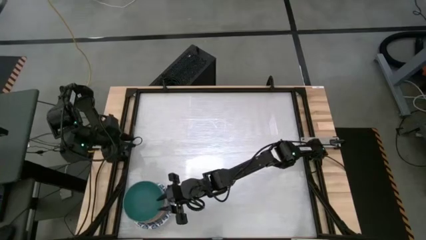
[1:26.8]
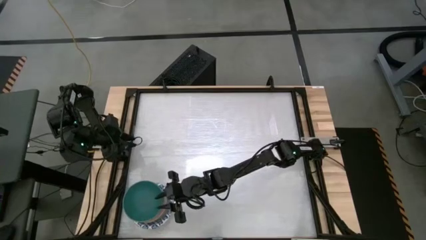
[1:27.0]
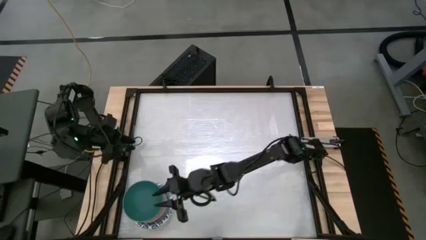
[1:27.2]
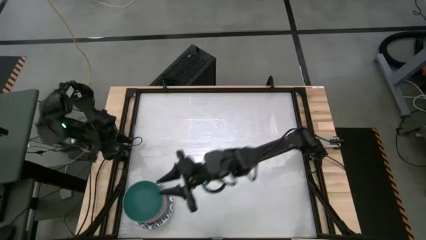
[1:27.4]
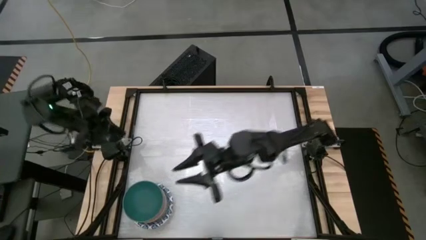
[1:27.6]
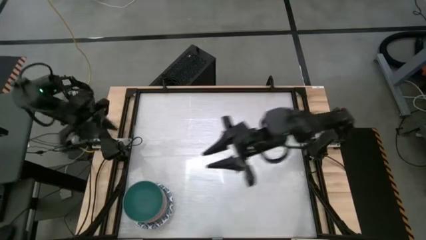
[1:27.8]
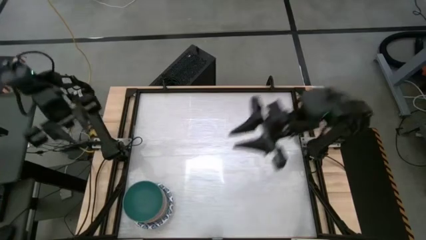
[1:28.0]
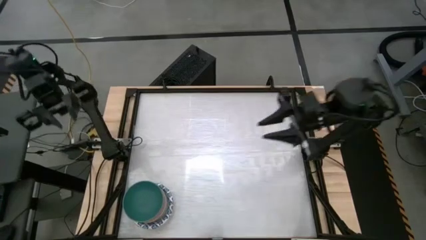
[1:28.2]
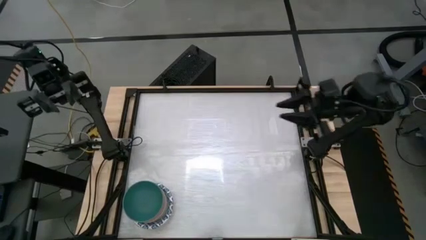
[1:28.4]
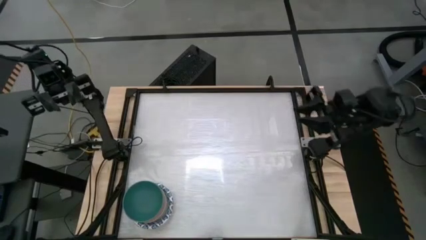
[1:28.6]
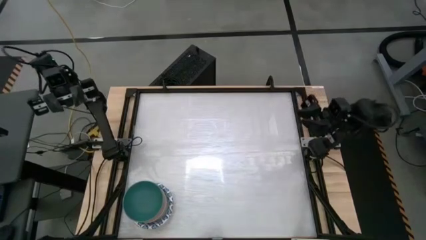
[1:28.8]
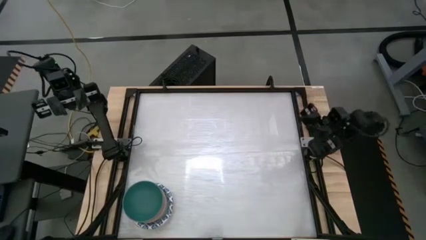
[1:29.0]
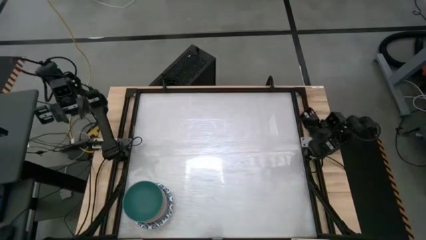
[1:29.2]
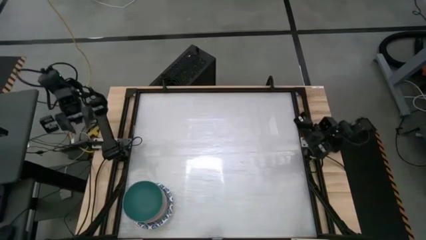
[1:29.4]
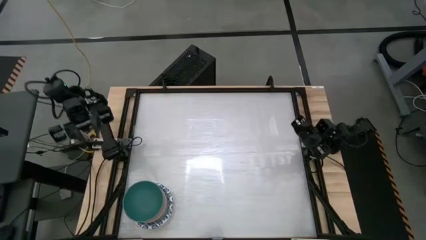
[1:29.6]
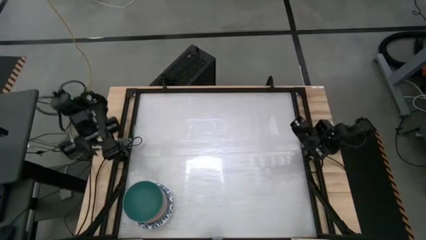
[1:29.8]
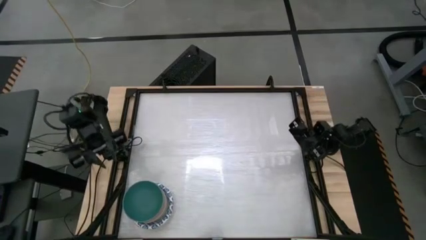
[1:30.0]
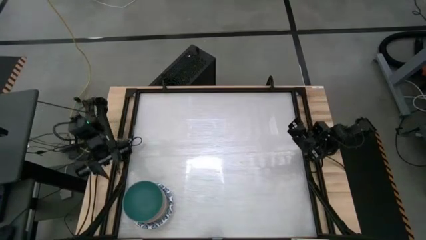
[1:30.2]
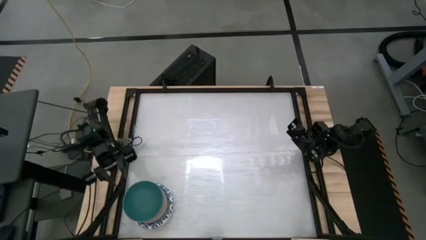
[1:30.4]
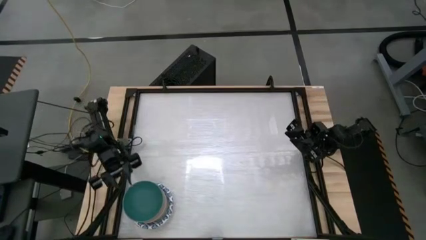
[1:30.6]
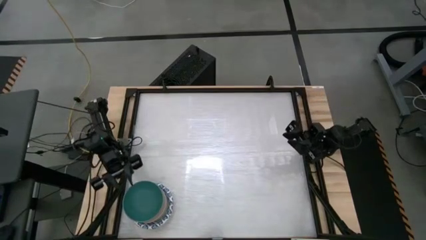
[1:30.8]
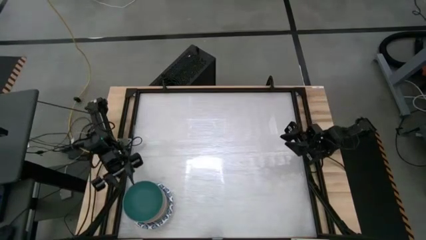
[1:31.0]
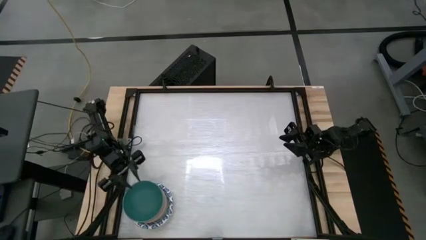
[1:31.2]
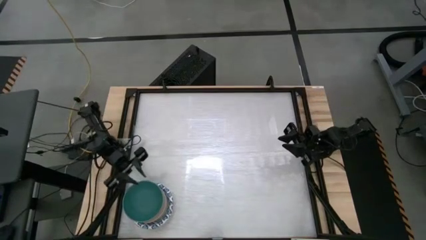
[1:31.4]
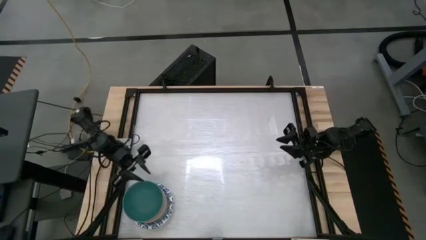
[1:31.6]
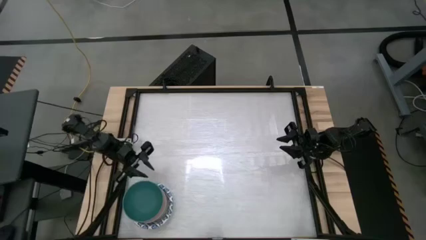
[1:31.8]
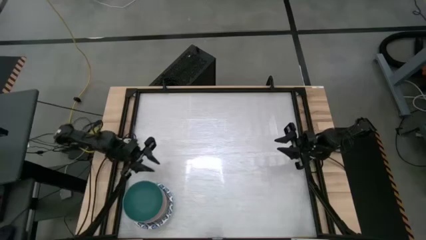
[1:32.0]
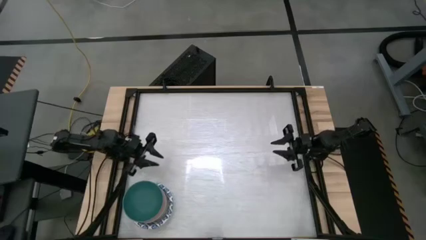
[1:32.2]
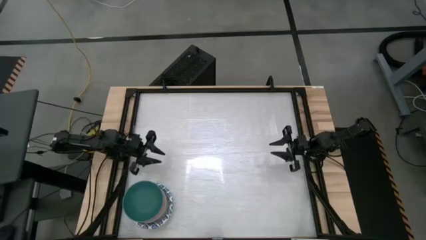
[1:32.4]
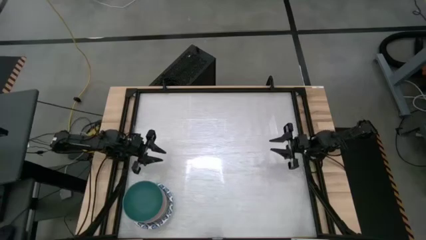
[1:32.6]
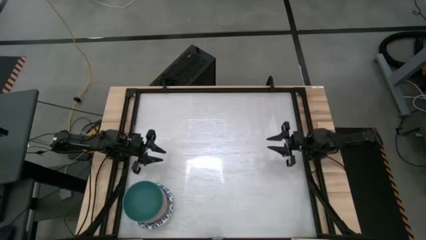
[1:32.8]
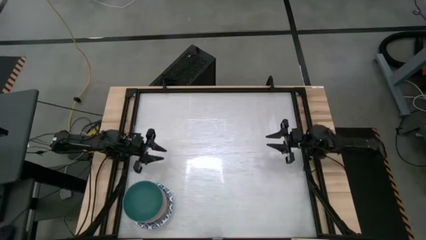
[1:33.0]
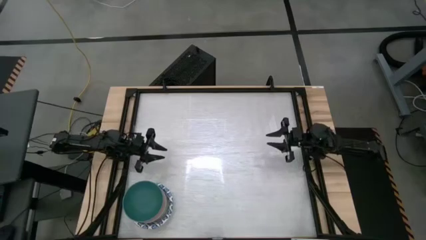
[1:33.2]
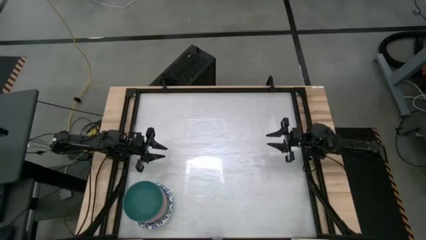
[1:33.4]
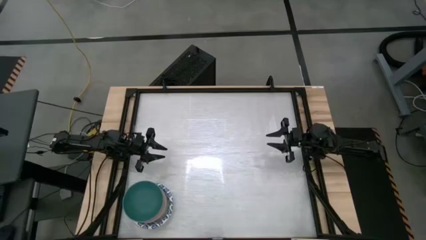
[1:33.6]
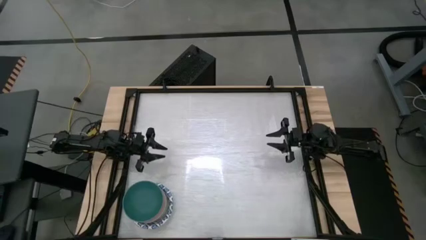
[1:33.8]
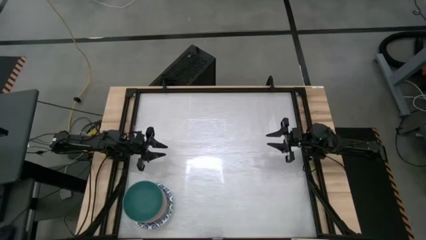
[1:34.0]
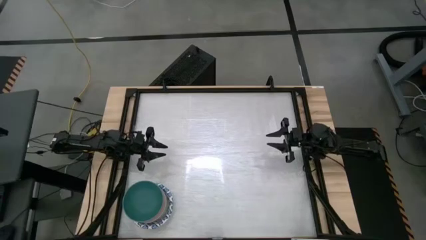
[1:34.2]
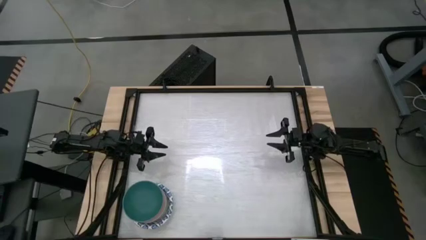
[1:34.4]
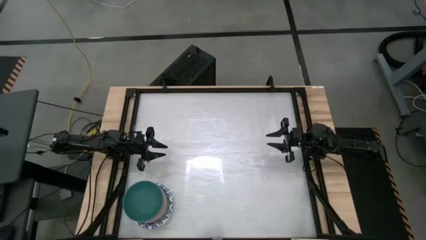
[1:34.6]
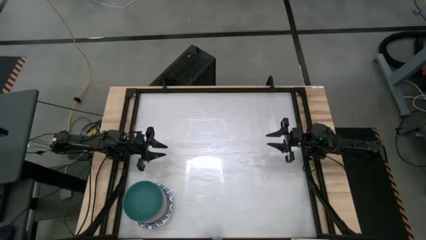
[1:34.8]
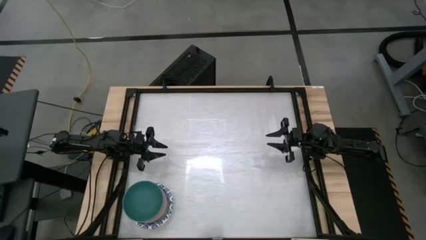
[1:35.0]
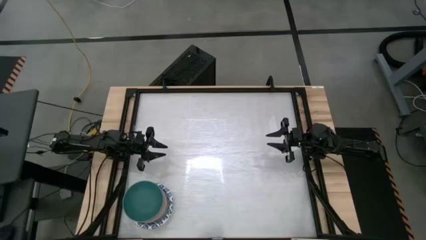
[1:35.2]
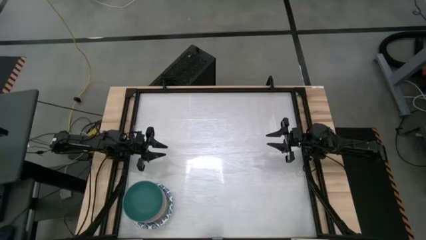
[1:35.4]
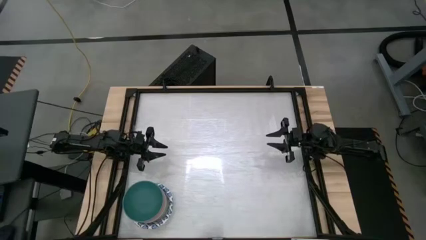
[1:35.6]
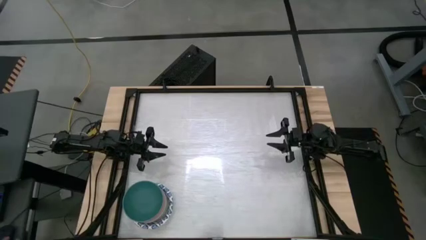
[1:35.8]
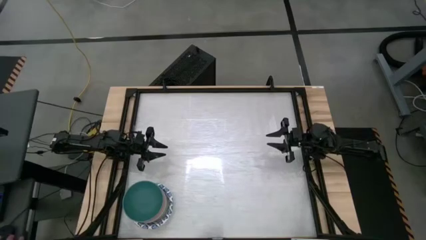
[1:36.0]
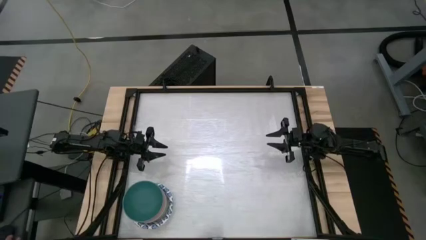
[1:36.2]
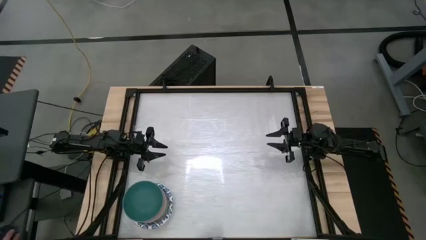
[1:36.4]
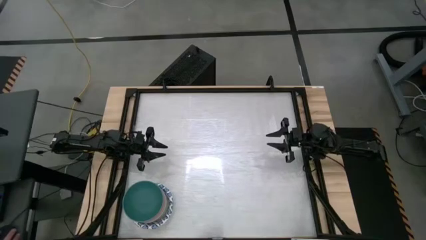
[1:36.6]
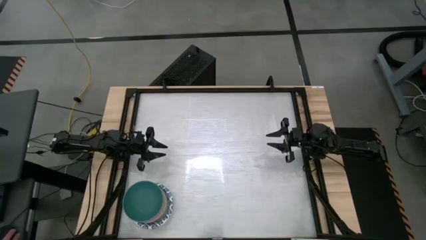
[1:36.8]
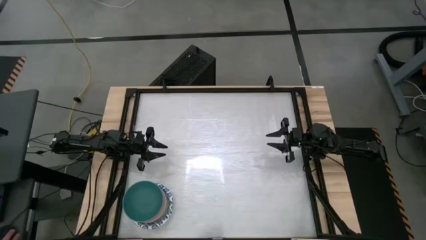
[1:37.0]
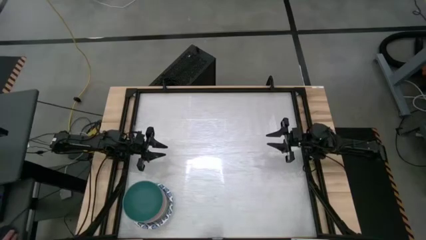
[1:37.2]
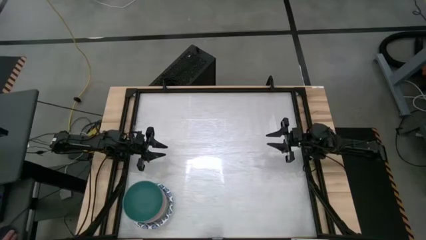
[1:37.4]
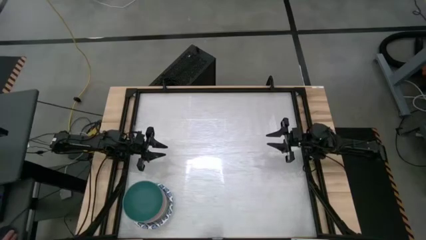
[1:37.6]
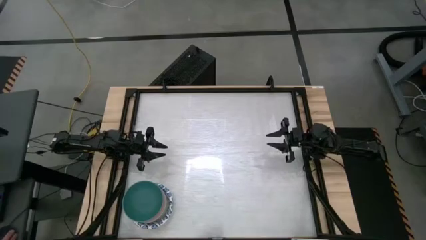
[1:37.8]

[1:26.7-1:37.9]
Return to Home Position
